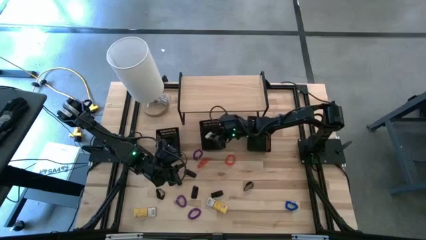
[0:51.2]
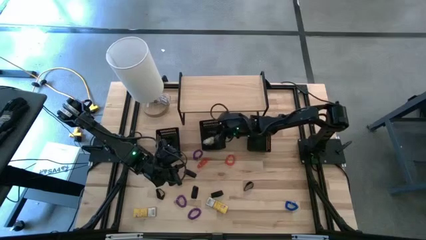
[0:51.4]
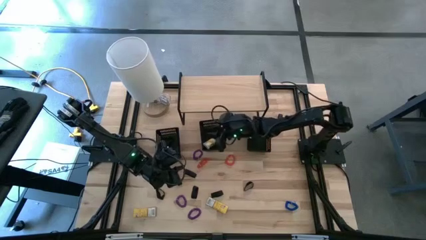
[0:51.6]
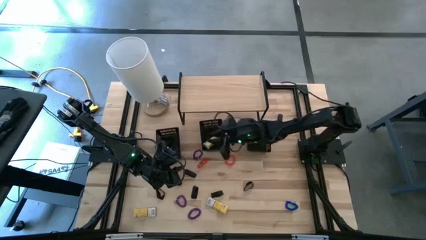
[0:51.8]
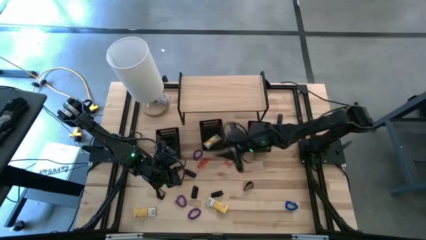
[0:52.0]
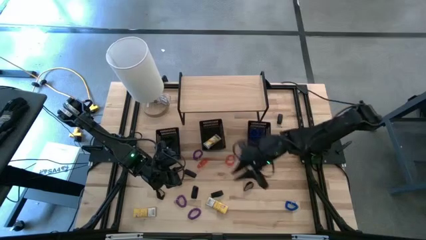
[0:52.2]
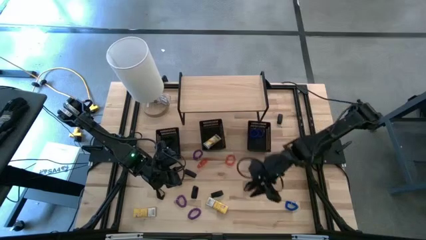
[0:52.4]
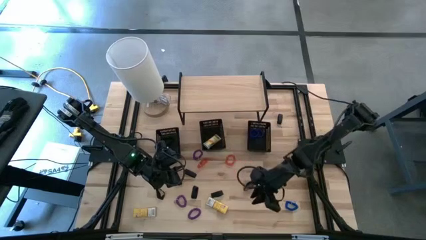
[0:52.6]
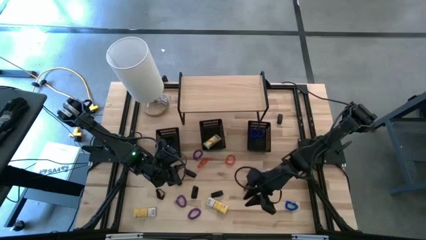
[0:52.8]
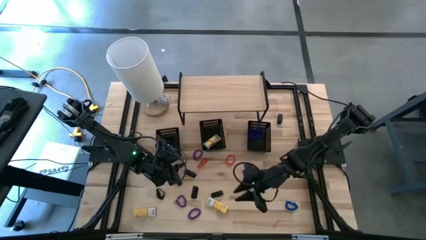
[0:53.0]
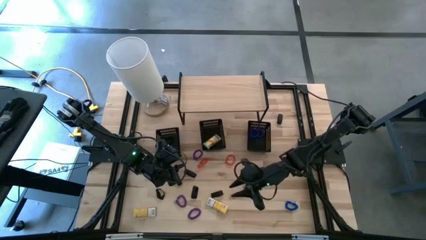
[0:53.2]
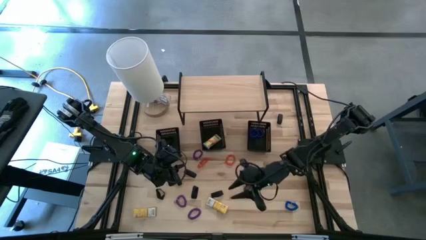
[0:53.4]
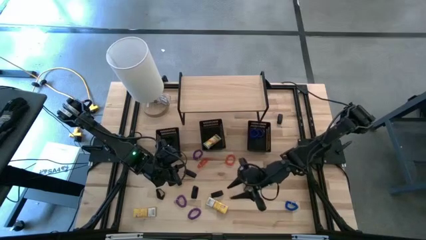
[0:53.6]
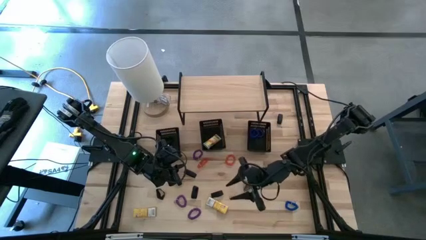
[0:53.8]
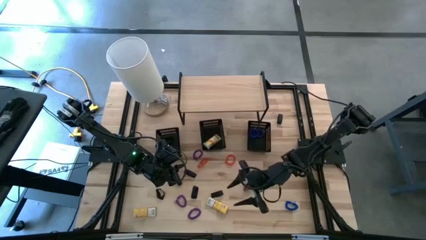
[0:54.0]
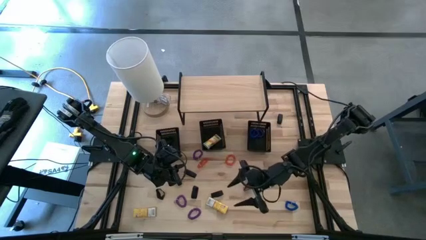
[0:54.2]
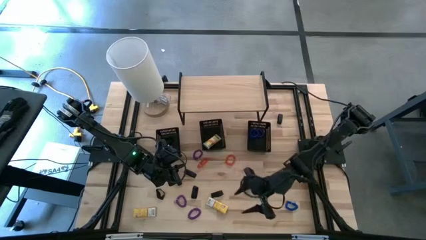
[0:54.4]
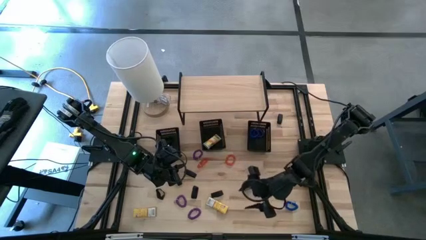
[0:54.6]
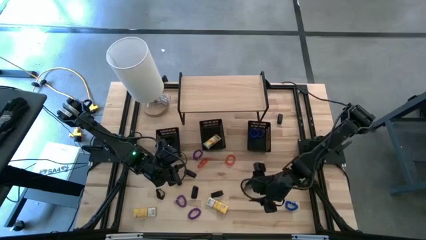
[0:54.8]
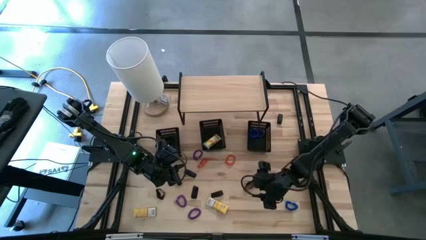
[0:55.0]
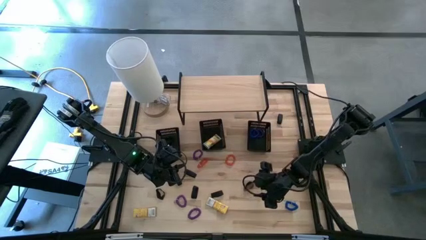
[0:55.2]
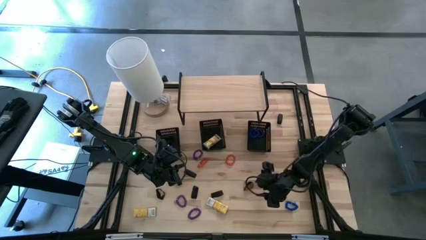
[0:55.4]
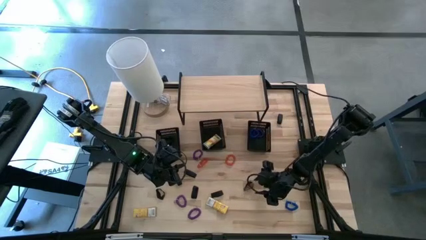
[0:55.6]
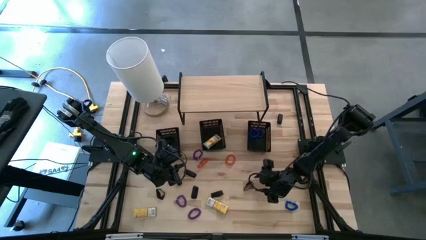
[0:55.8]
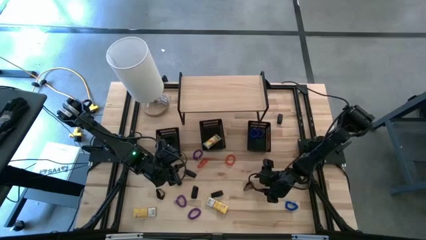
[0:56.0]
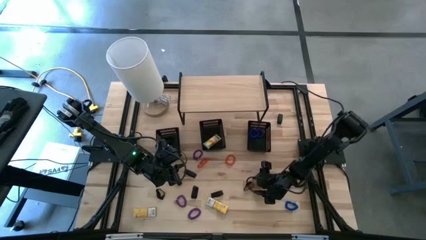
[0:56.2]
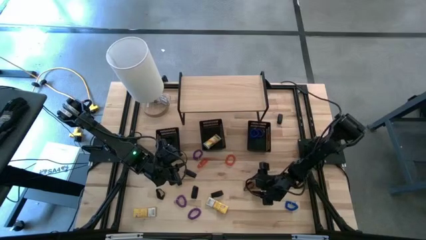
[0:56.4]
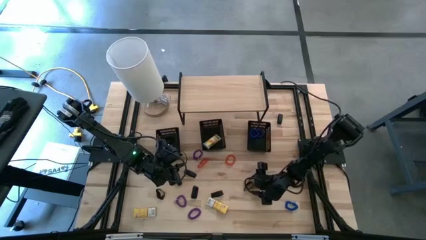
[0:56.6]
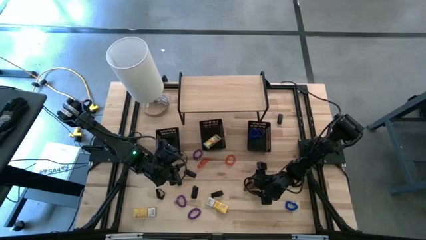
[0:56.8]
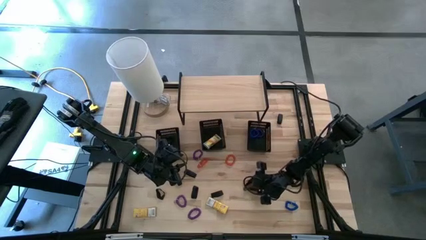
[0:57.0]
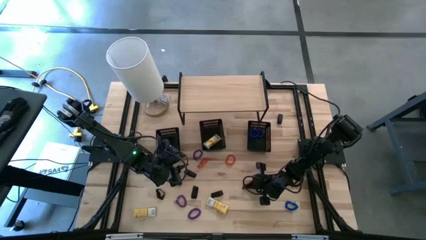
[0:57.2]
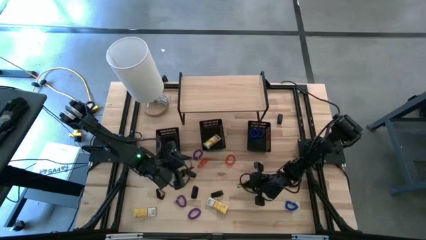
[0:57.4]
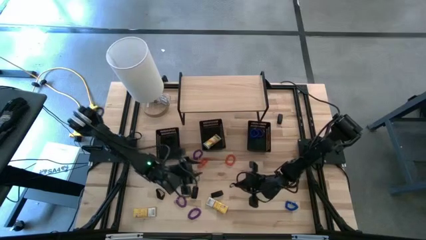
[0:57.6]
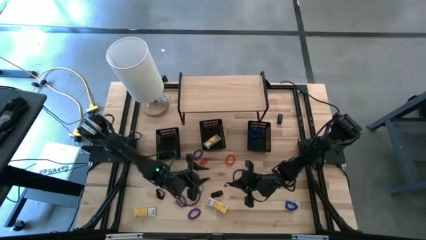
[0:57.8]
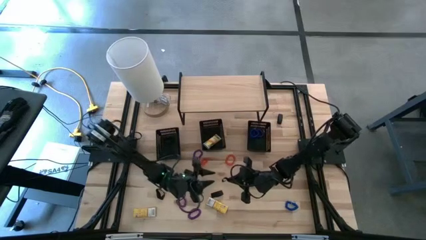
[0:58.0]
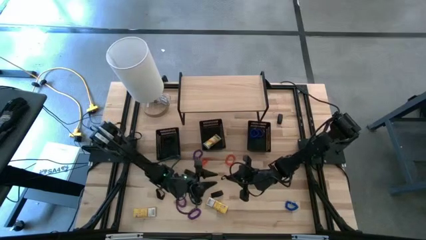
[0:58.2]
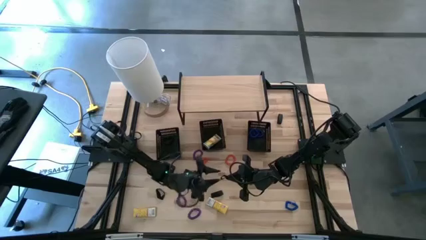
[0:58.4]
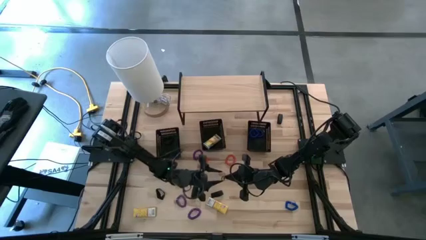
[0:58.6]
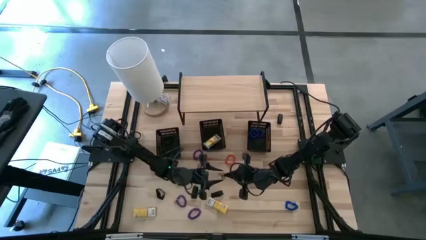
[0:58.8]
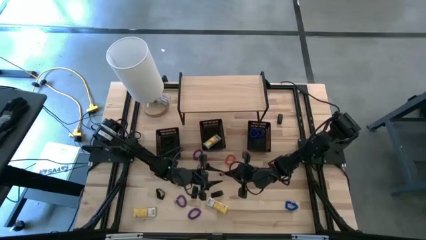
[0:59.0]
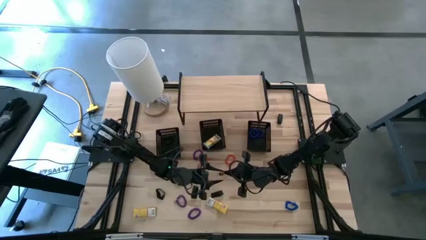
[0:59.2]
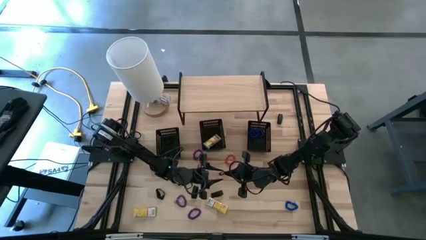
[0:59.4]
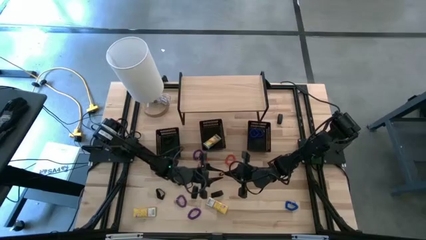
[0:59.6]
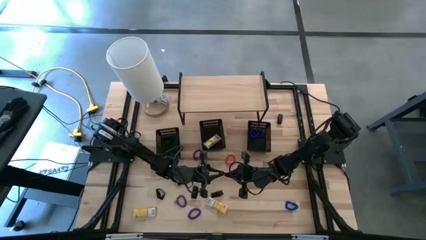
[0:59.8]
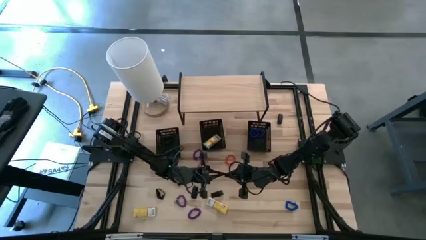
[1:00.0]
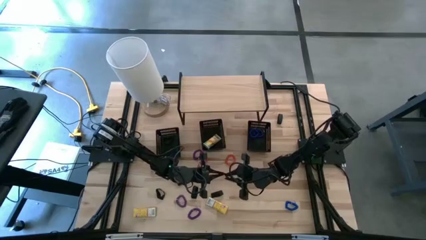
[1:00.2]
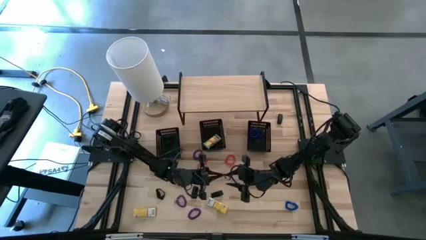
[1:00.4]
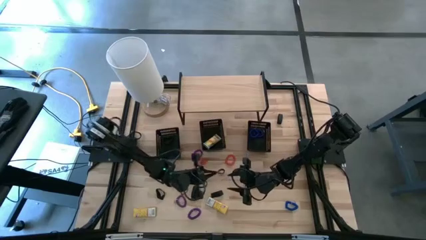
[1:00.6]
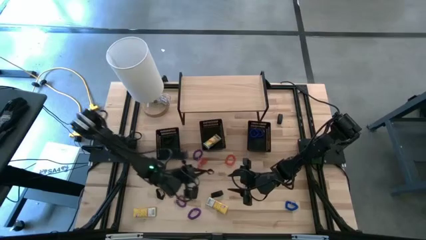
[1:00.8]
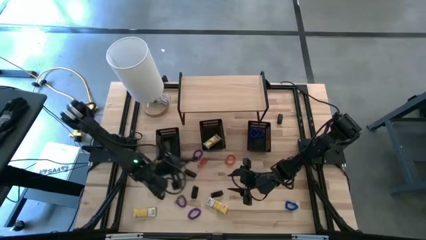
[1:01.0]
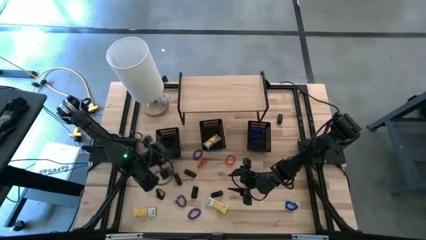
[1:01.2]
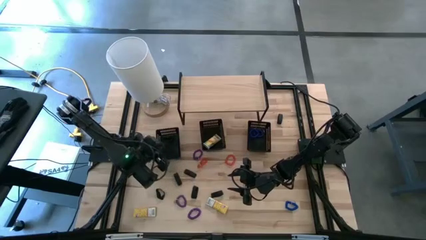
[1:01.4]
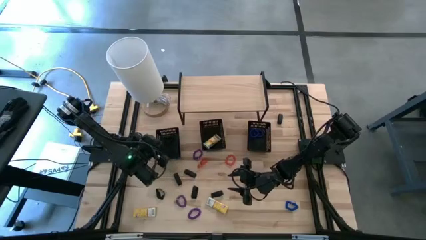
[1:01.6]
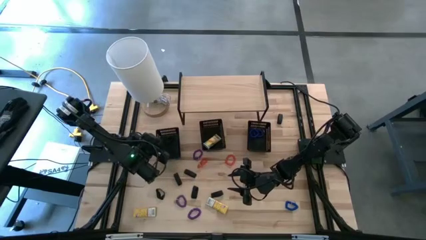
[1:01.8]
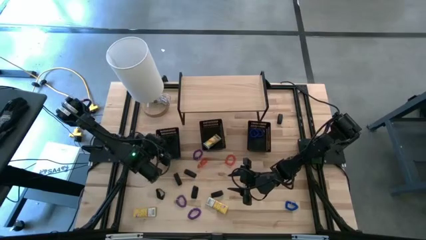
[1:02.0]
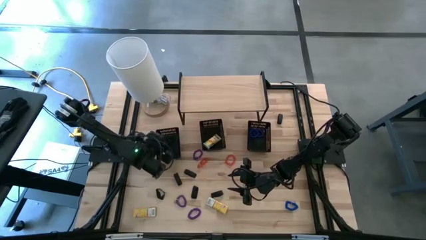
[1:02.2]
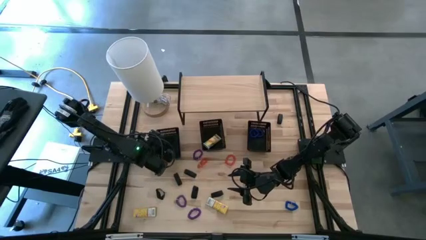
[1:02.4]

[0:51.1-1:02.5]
Task: Pick & Place Office Desk Supplies
Put the black rubber band into the left black bin

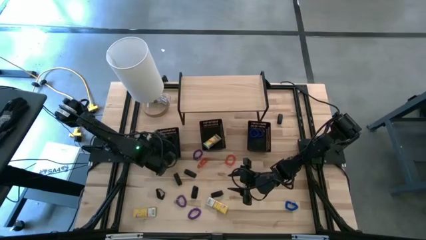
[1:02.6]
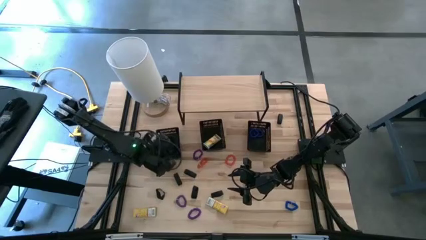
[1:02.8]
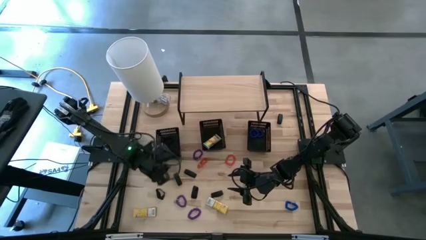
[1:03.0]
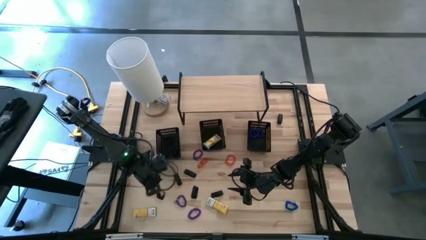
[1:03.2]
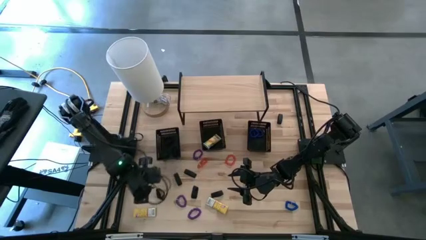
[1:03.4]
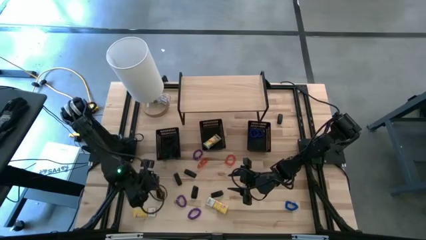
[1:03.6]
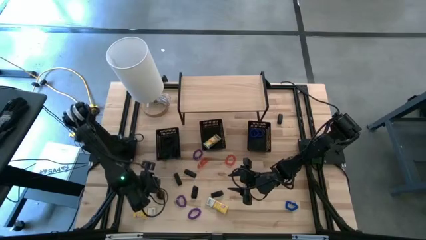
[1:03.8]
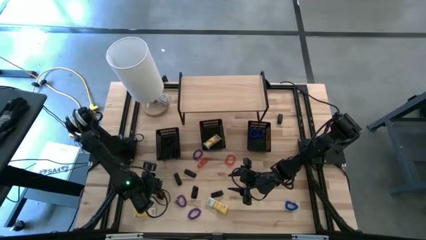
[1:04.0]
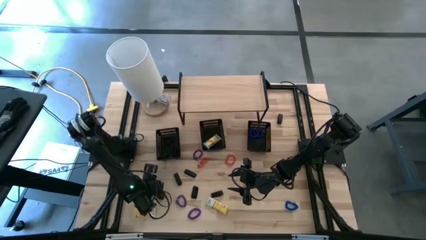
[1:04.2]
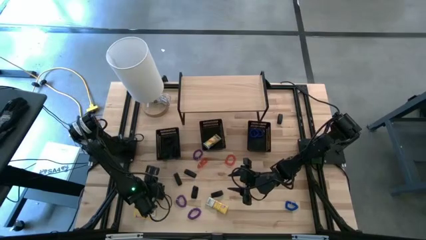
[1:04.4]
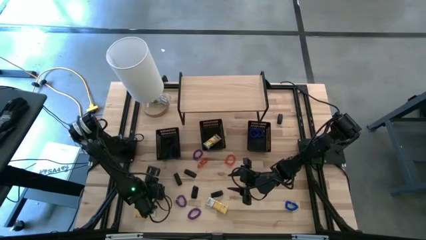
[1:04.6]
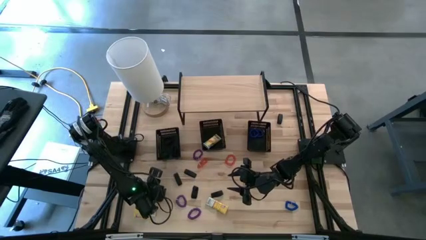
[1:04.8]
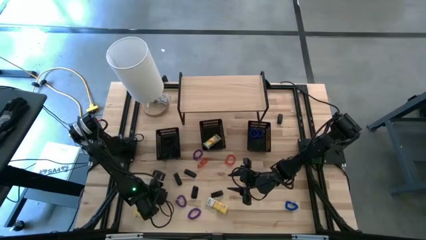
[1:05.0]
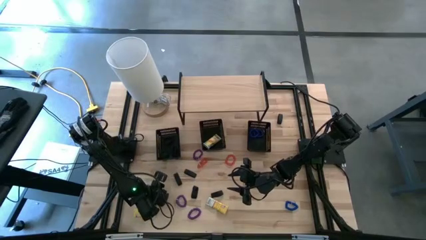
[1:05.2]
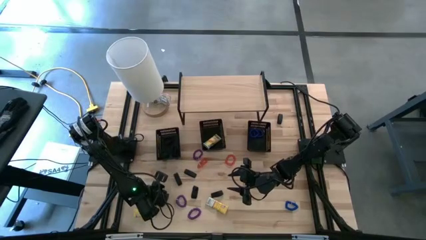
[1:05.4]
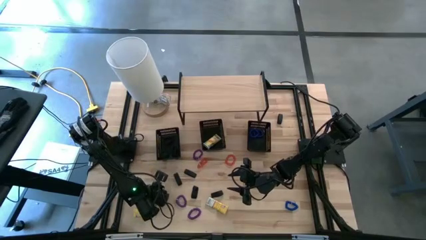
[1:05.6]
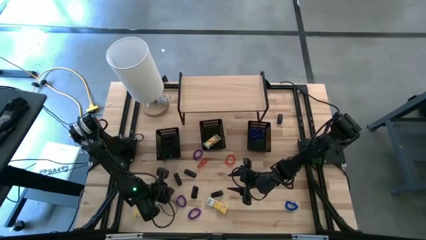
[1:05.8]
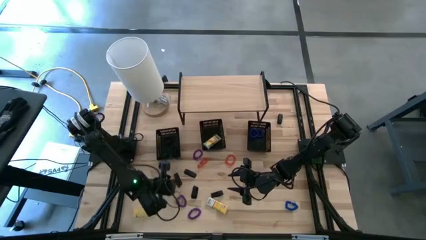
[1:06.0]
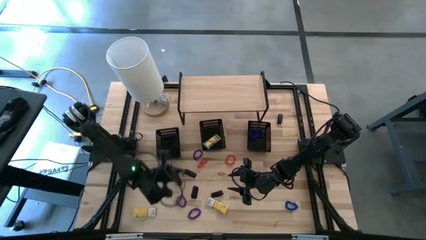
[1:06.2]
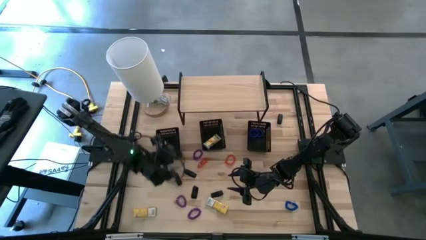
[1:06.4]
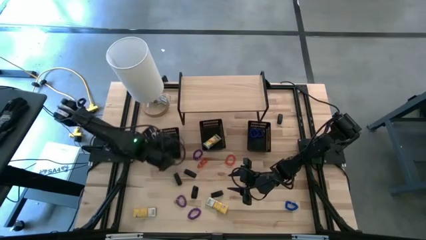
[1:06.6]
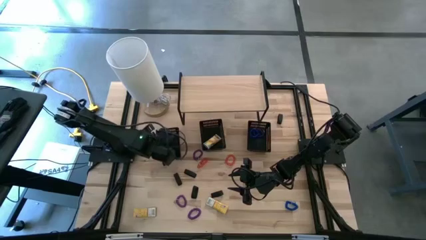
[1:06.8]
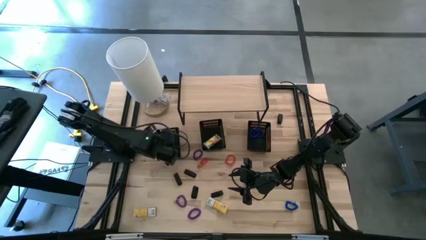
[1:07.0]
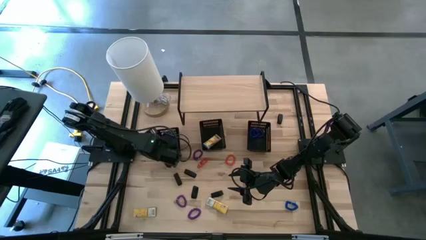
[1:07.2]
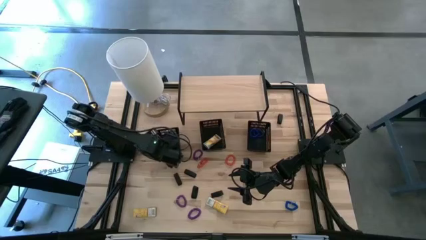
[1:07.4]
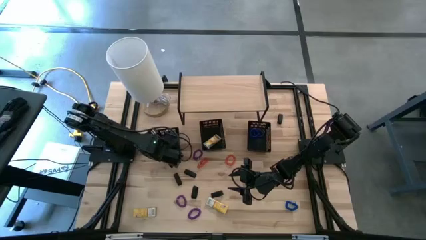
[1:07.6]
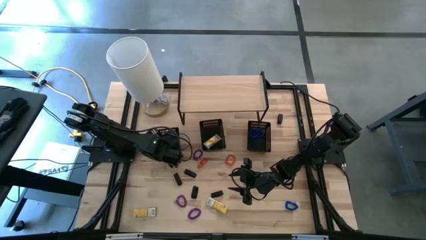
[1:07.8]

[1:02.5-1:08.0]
Put the black rubber band into the left black bin

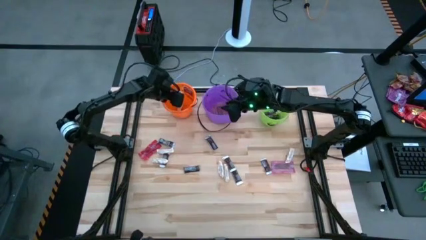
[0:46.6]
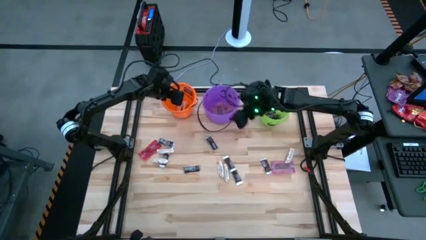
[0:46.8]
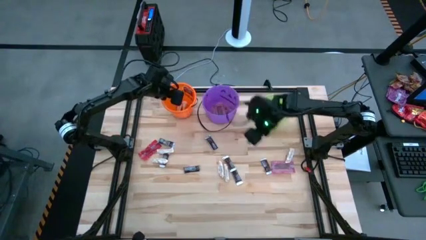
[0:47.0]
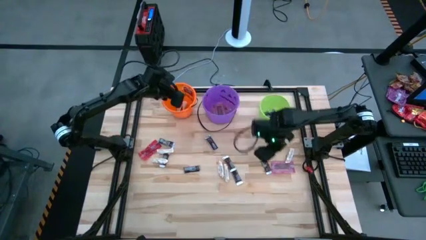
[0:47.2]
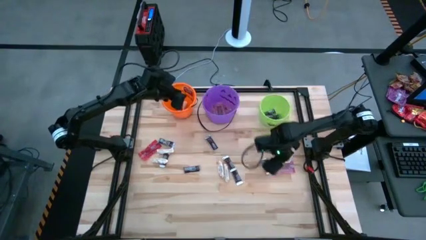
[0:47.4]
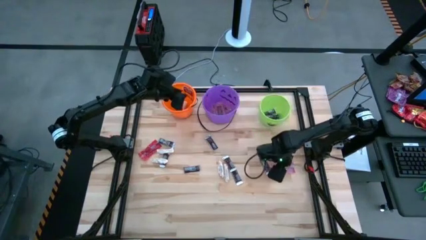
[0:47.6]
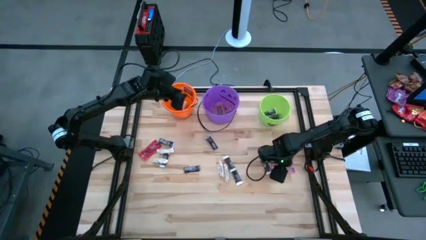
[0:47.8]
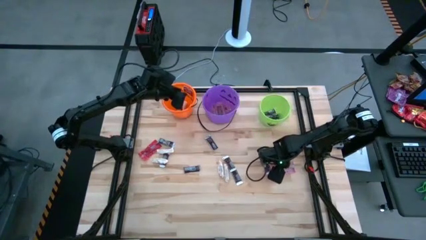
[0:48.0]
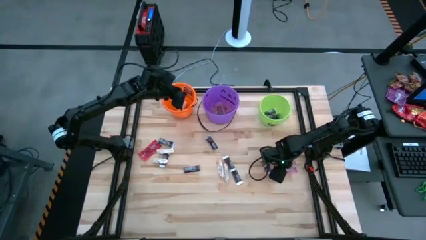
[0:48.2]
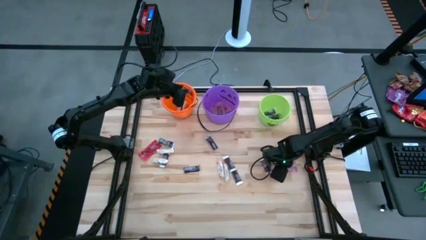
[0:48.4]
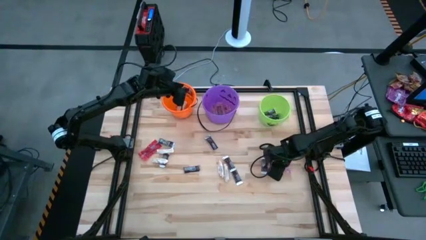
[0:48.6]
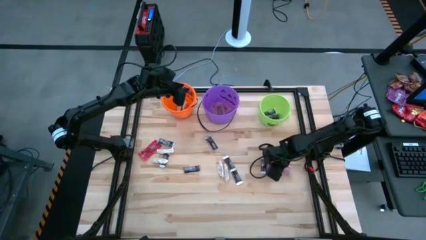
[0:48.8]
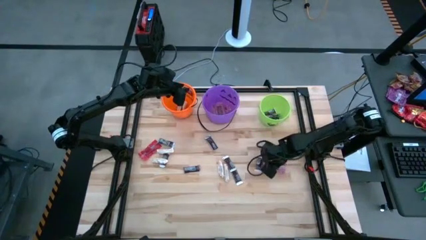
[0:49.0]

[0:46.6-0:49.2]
Task: Sort candy by brand, put in halloween buckets
Put the red candy pack into the purple bucket
